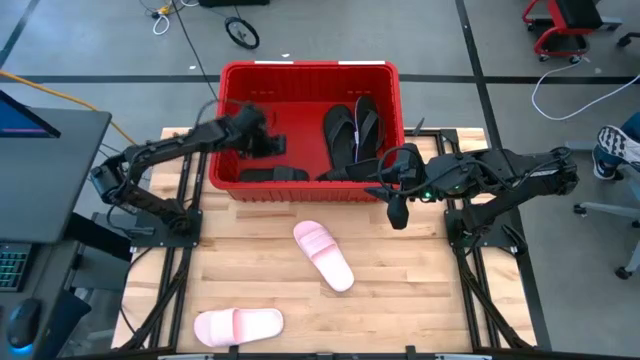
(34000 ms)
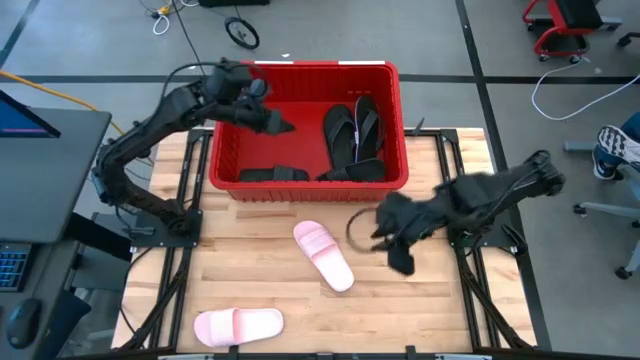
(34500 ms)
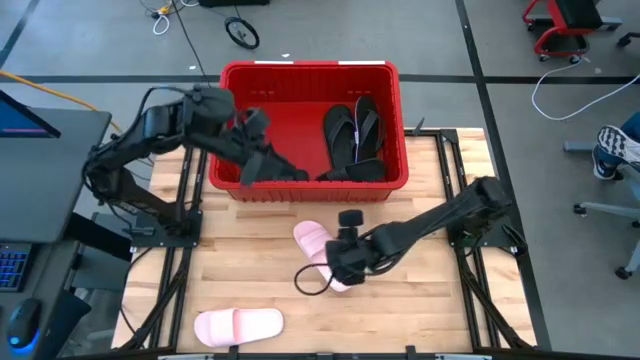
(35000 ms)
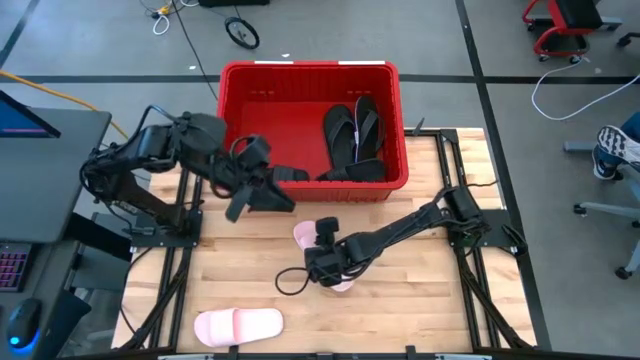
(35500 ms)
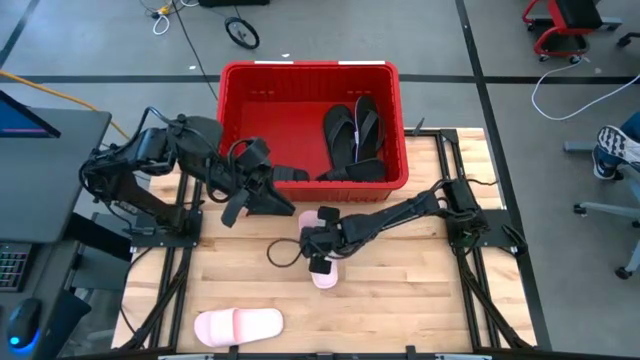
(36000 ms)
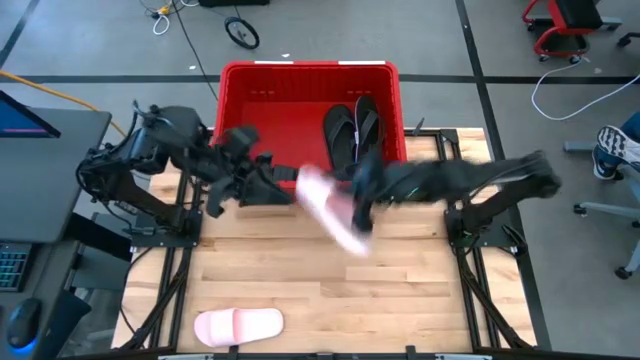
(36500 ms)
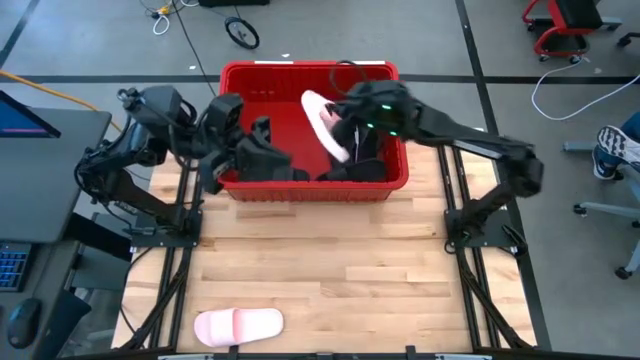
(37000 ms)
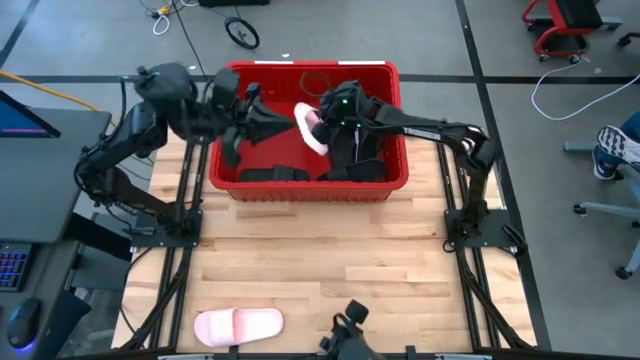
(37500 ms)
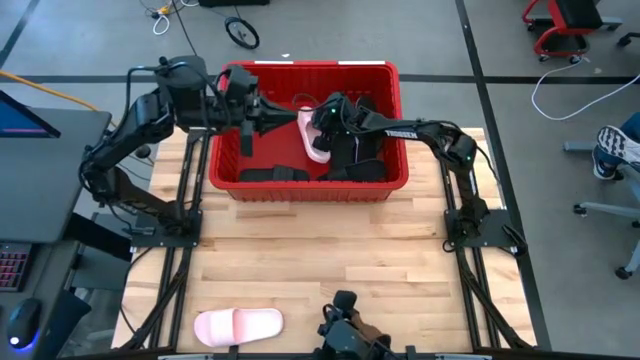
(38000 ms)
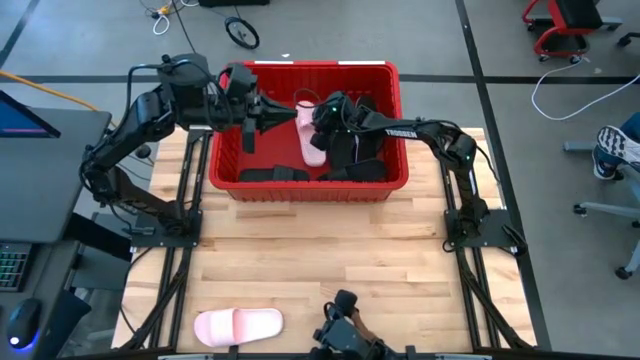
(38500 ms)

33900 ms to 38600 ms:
Task: Pick and place slides into bin
Put the top pink slide into the red bin

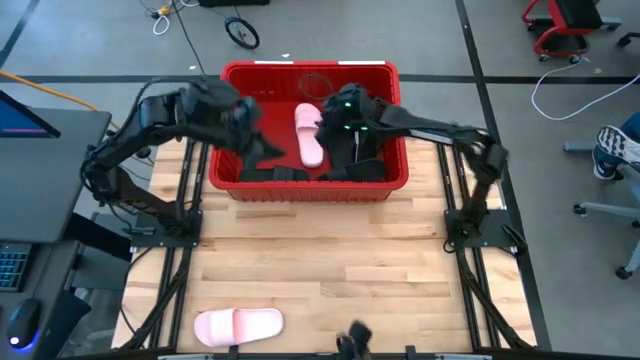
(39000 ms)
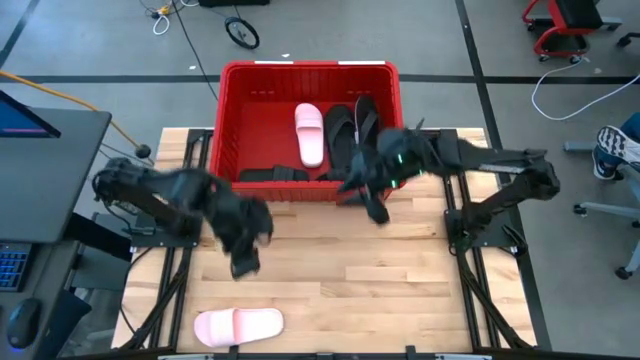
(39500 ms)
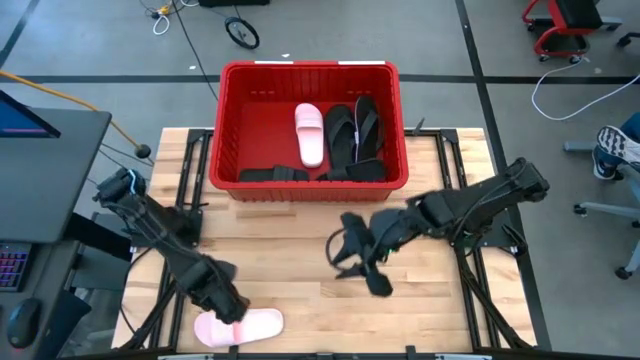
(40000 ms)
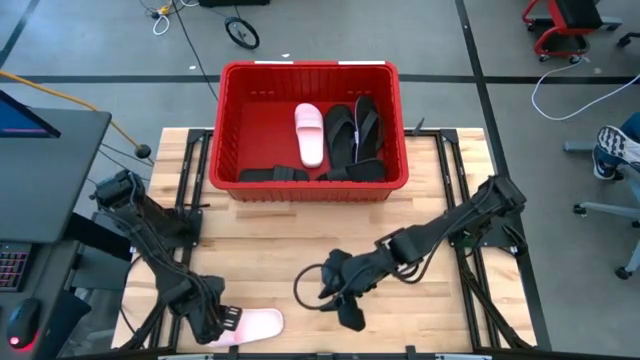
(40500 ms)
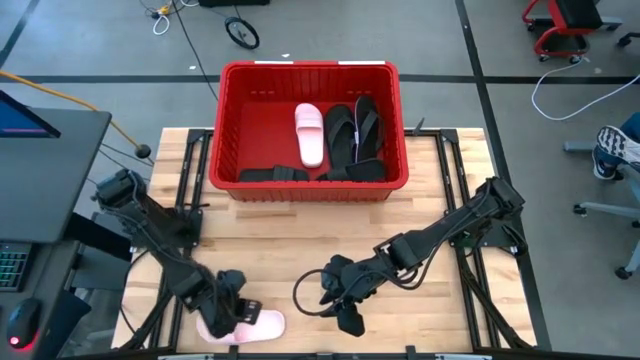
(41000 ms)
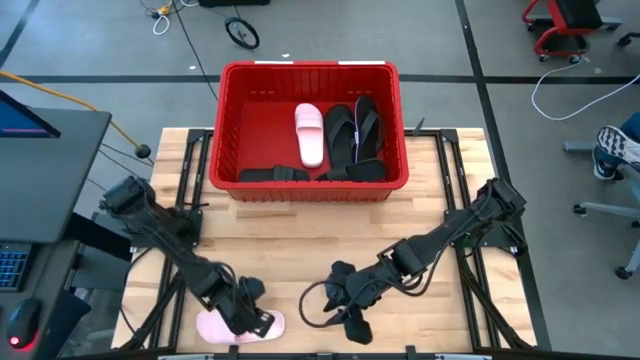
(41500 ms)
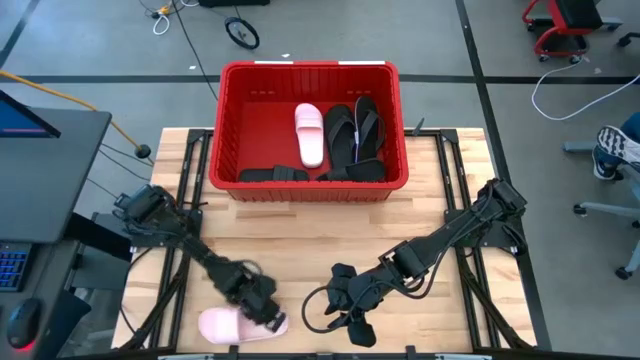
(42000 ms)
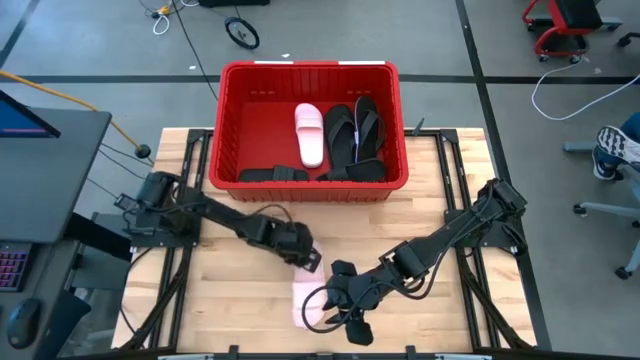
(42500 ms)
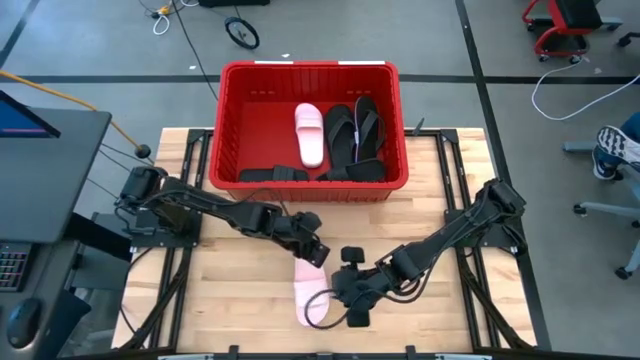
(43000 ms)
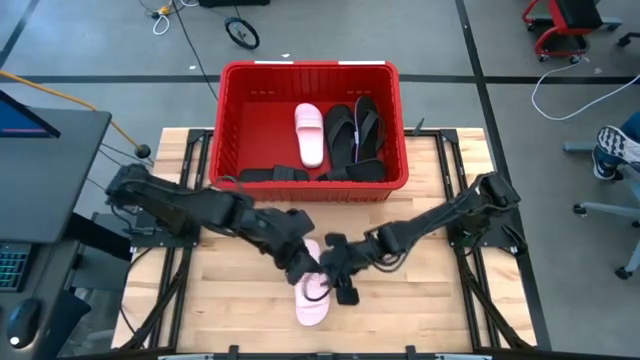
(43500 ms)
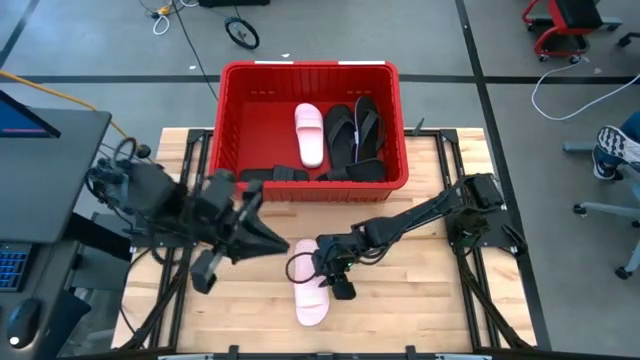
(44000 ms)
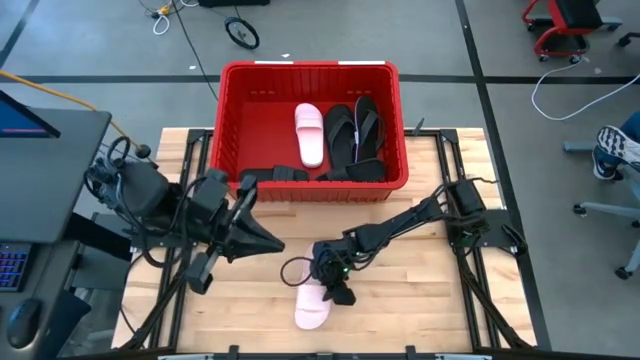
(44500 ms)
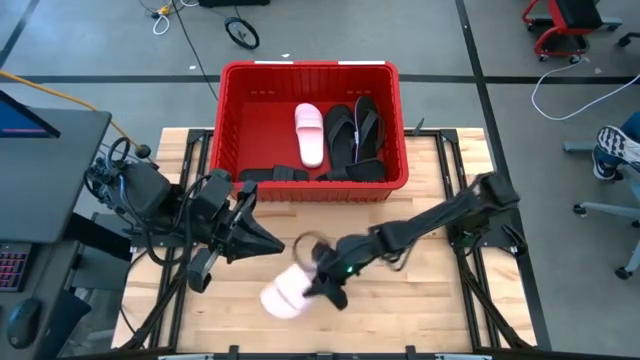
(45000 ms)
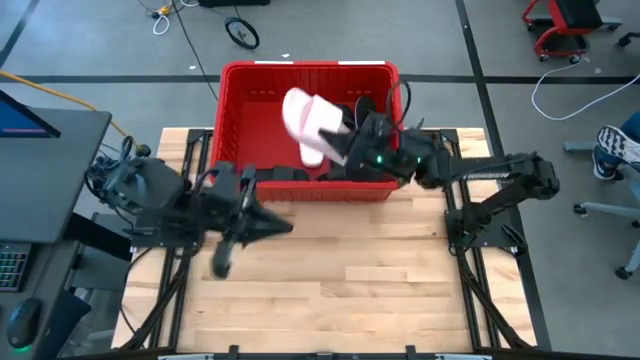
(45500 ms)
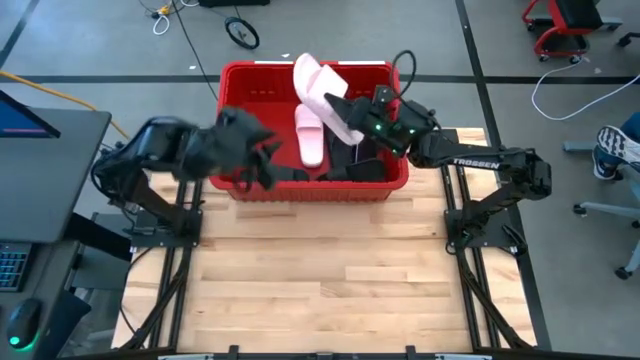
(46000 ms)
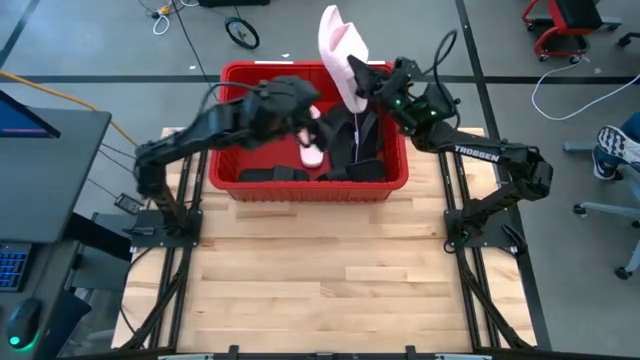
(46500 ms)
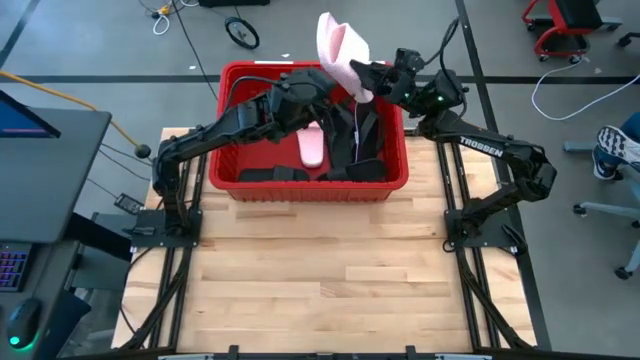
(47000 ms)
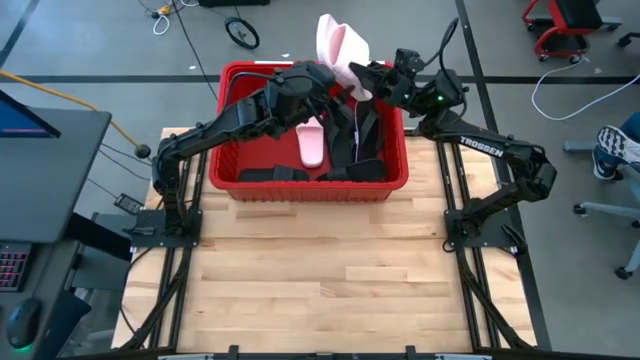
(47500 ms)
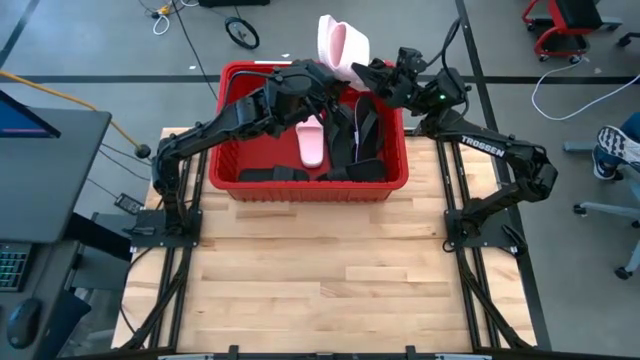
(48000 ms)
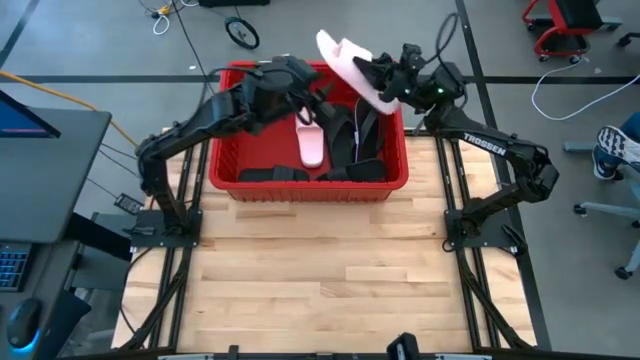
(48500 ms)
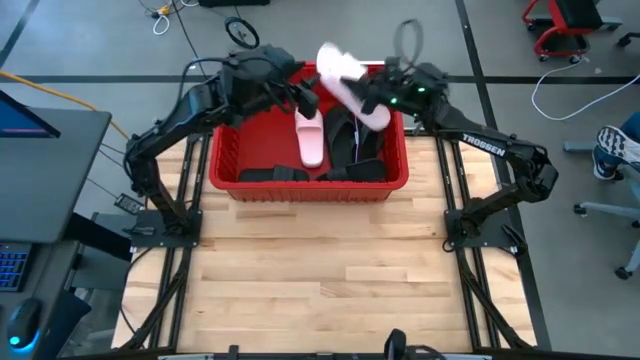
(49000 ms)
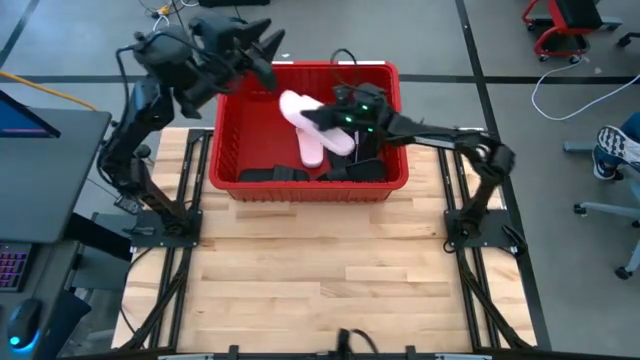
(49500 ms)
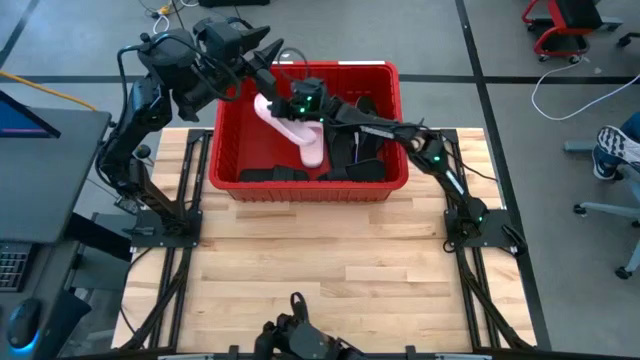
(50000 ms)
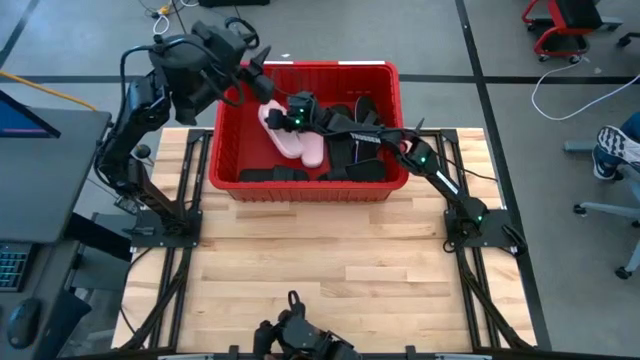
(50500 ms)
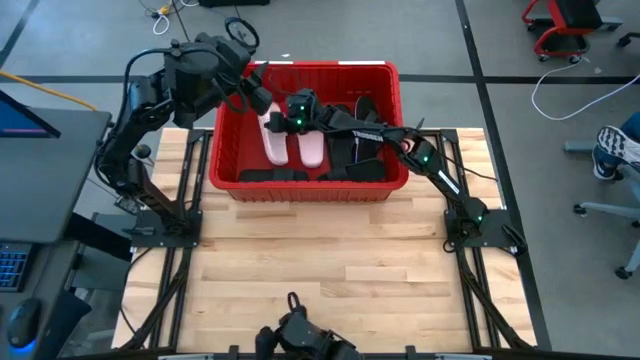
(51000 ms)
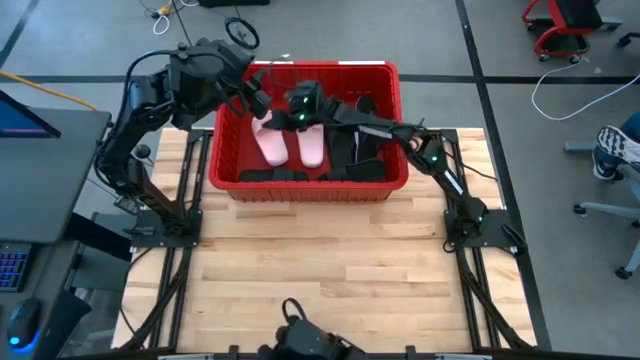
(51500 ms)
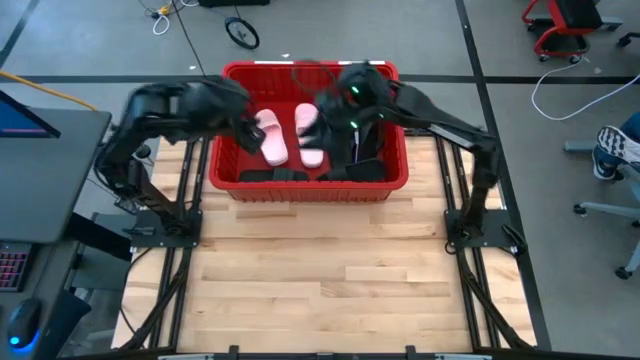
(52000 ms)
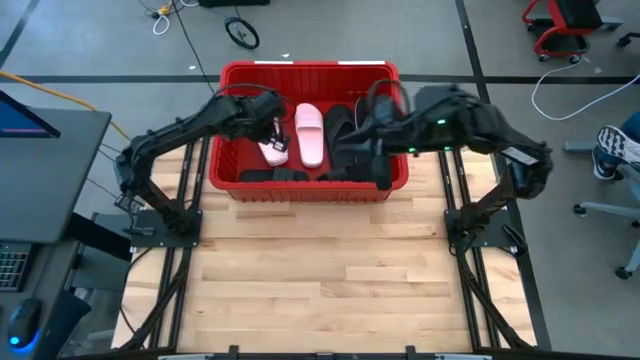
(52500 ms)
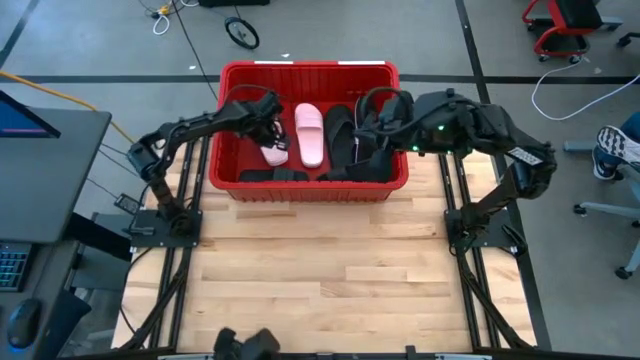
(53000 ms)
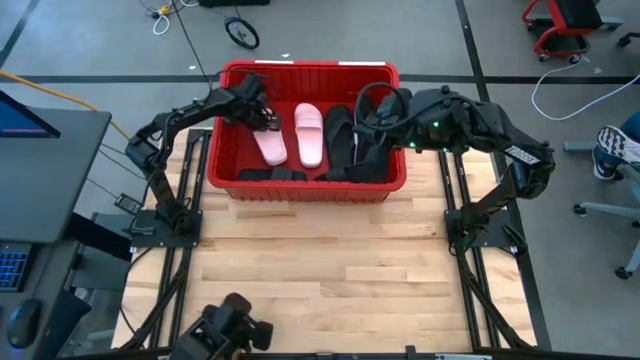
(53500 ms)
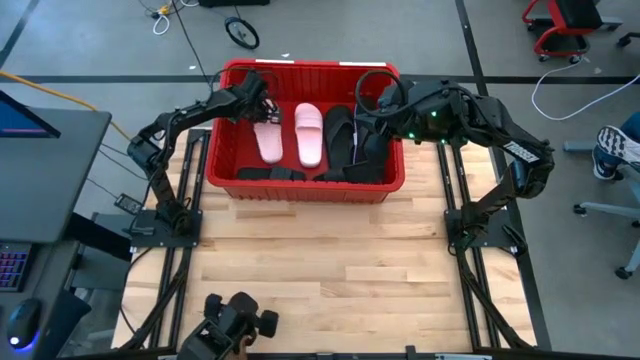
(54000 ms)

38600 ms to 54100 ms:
Put the pink slide into the red bin

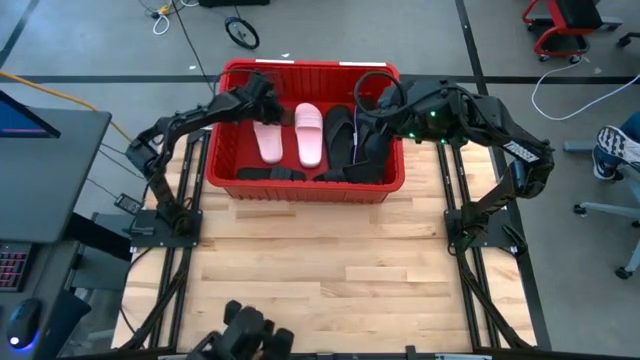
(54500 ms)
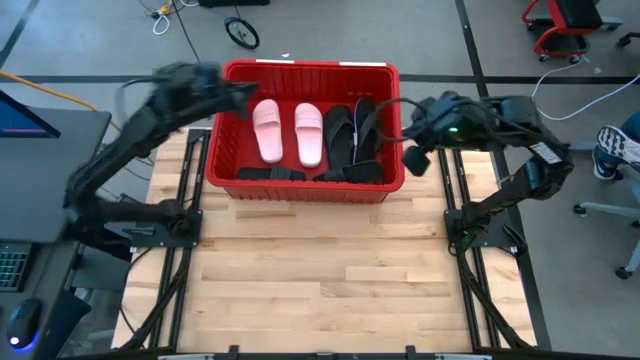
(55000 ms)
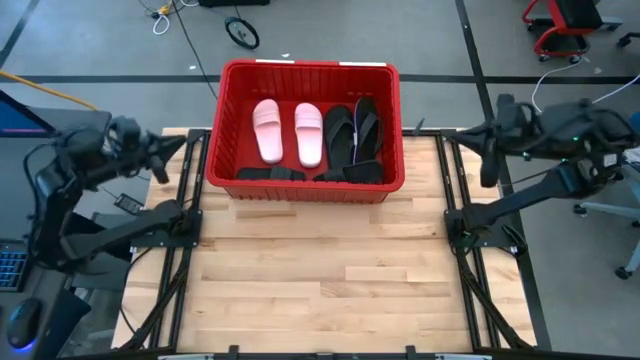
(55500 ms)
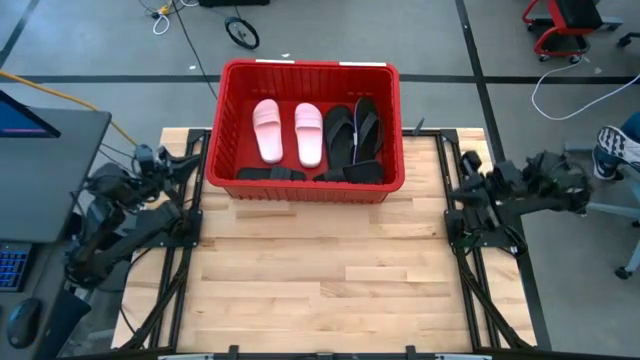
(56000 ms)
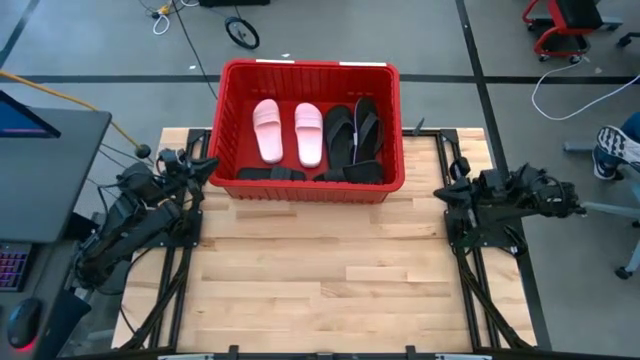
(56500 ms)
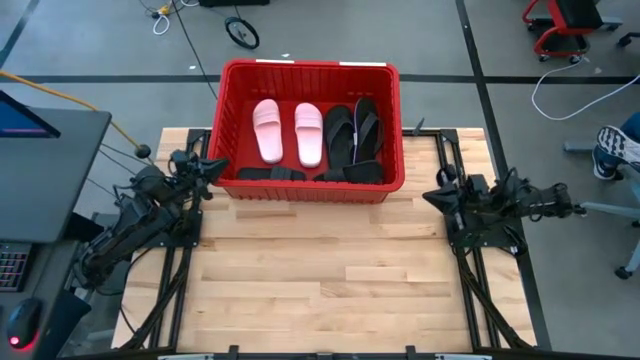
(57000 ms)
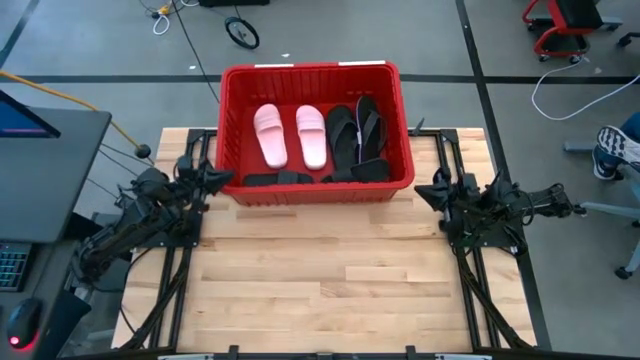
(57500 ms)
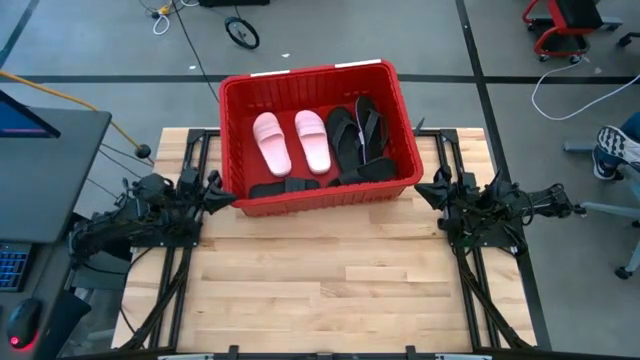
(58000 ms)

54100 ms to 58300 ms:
Adjust the red bin
